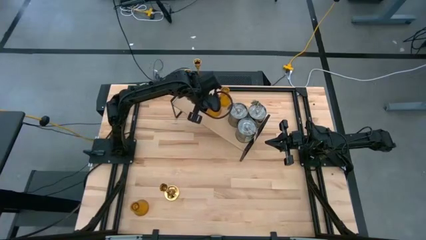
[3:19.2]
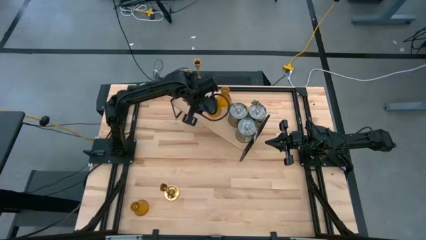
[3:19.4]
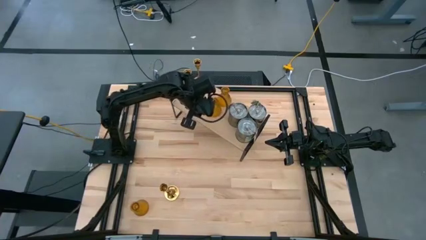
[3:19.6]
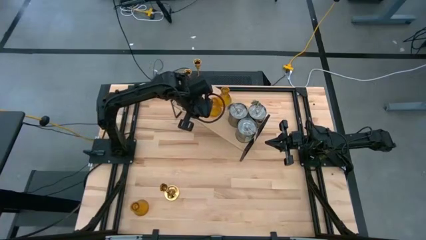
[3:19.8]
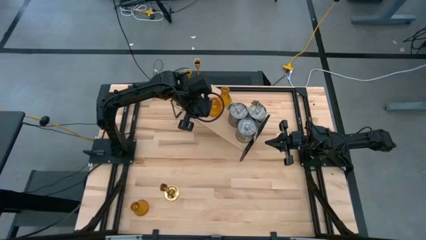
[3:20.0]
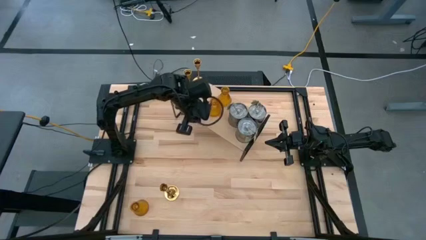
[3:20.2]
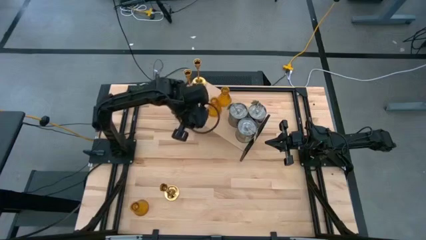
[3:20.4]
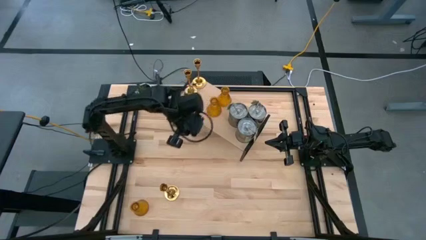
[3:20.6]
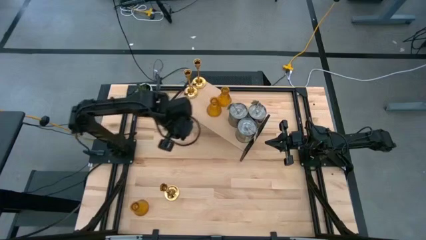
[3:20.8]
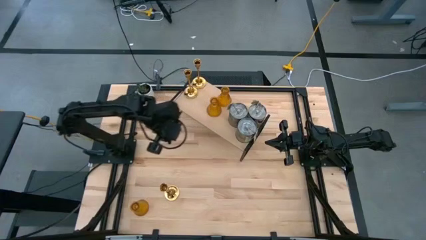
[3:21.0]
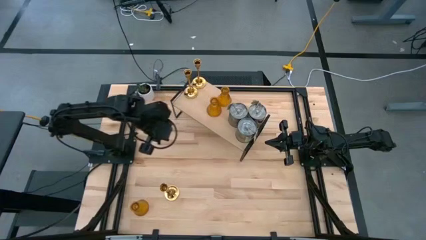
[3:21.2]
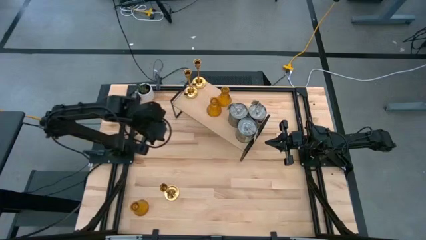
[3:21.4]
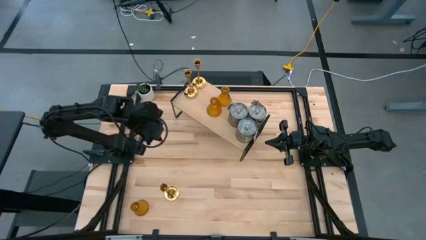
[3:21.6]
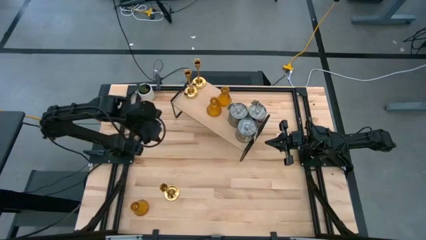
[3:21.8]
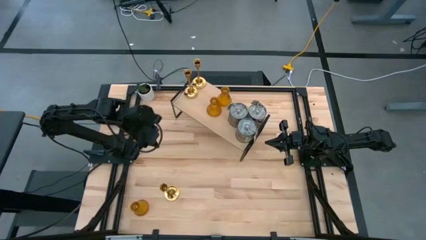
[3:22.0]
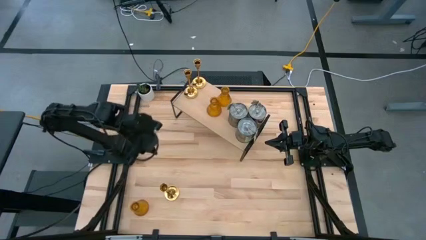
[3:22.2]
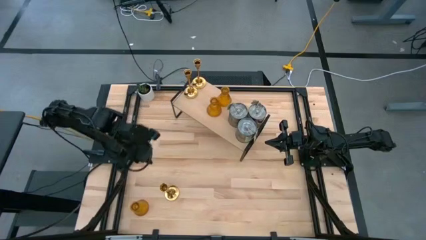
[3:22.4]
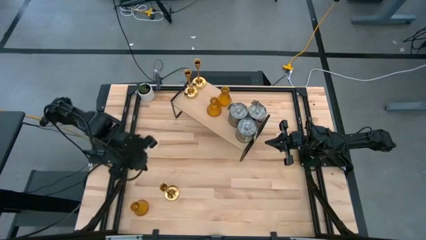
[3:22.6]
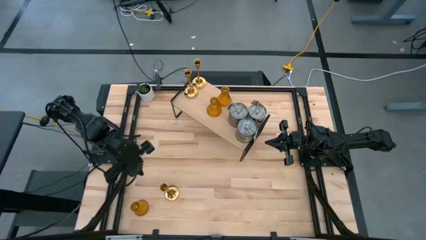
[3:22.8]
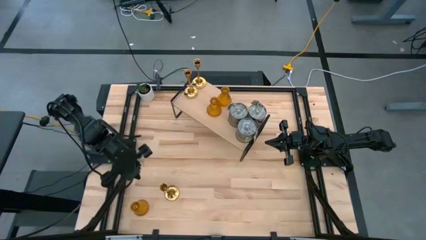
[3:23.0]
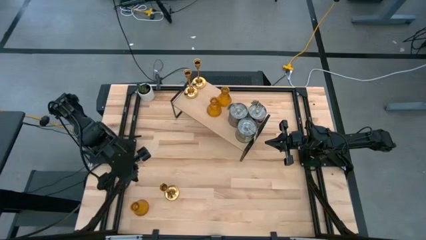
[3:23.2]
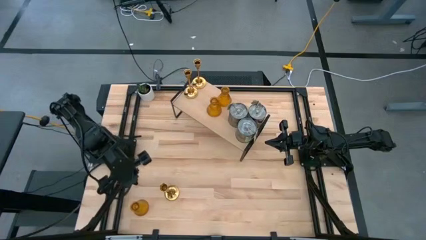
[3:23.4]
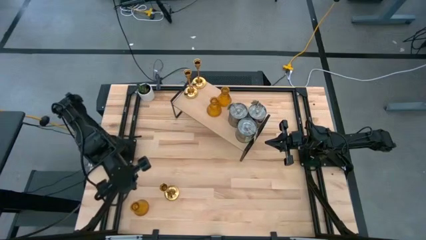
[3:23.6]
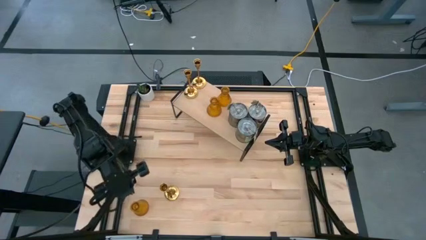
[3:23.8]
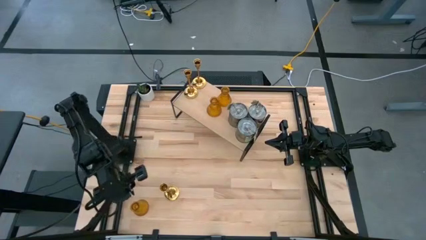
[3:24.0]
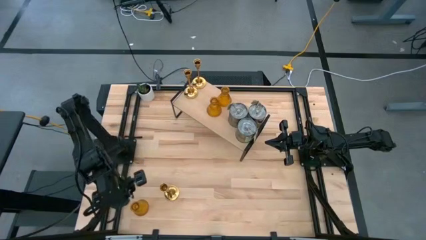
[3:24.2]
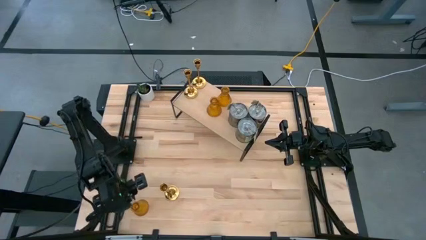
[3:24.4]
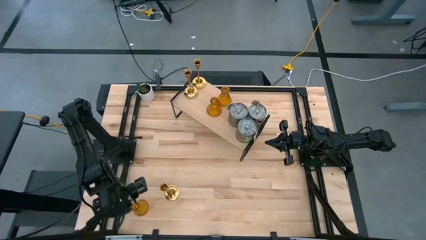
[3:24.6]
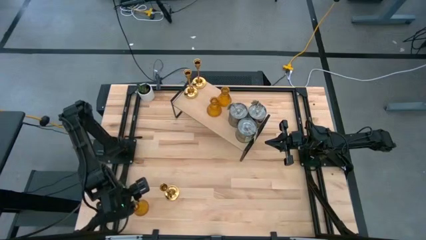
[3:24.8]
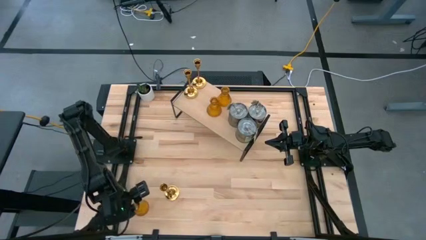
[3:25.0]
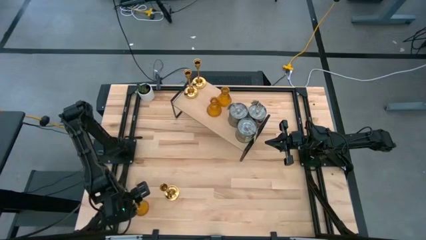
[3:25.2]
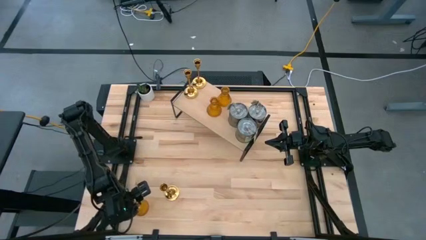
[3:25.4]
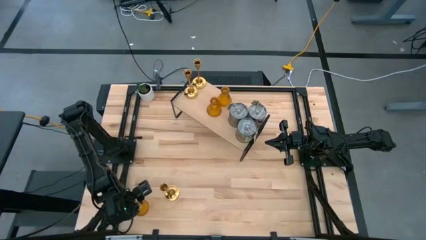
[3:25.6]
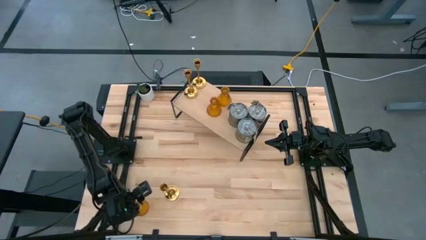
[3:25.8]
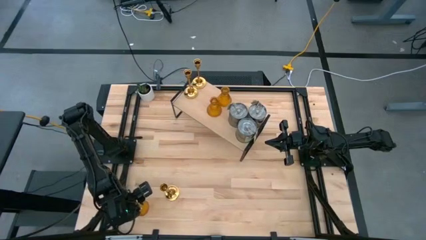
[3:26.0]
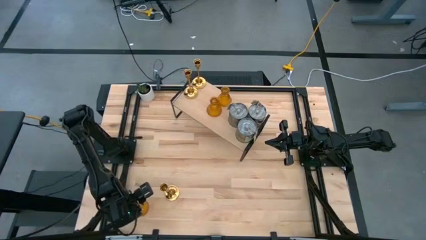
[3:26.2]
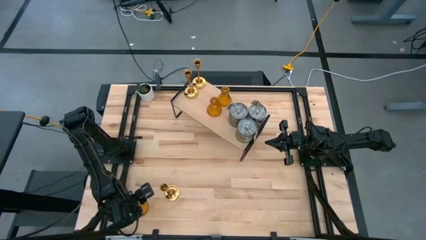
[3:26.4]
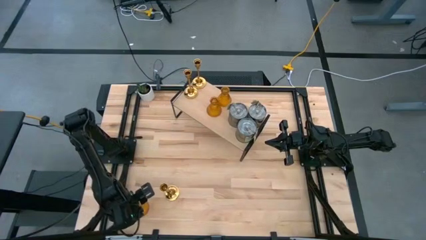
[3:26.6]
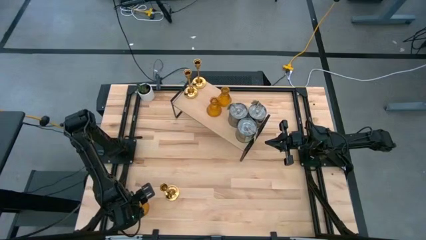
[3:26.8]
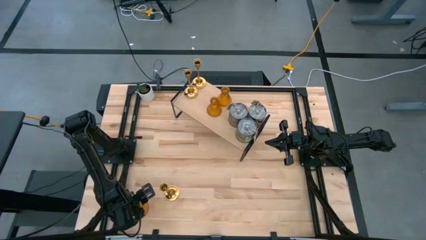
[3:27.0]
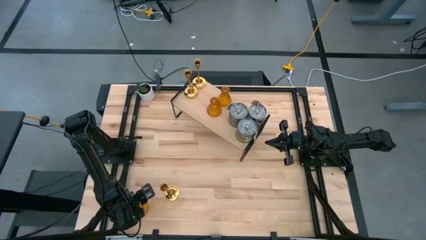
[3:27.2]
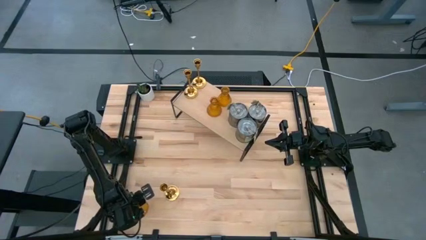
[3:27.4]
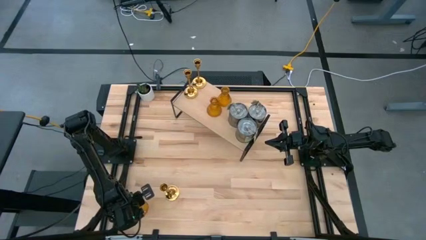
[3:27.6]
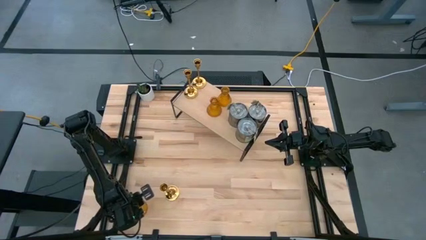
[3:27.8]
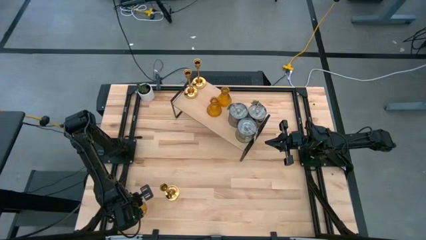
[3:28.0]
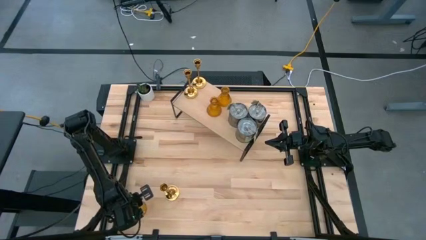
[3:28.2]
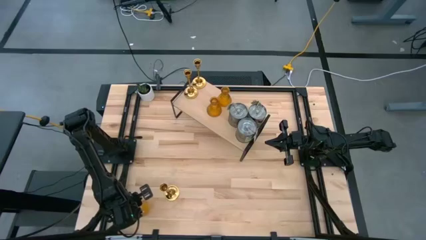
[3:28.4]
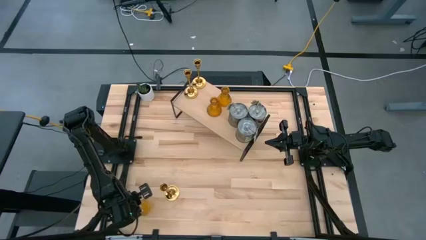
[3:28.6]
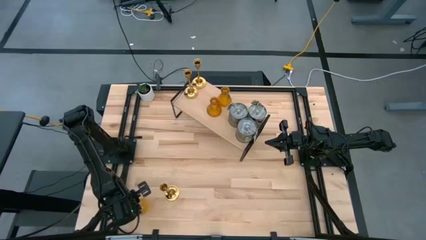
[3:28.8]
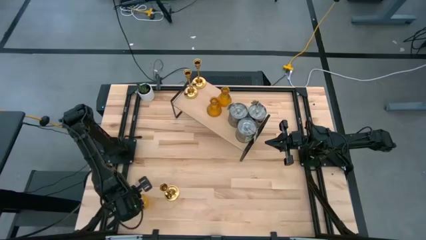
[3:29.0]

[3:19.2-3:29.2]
Task: Pick & Place candle stick holders
Put the yellow candle holder on the shelf aligned with the other yellow candle holders

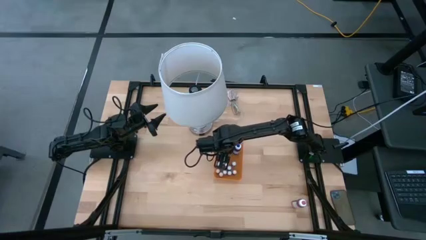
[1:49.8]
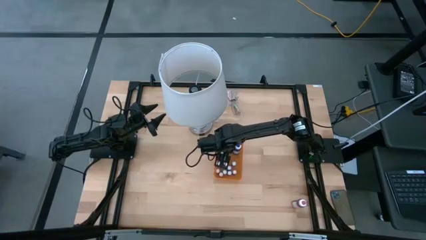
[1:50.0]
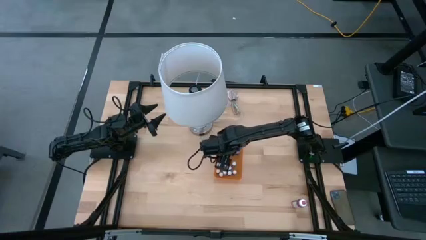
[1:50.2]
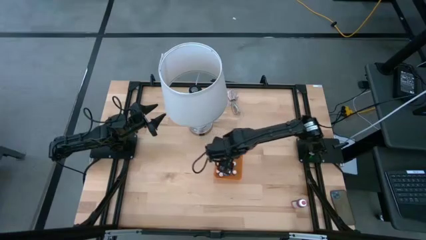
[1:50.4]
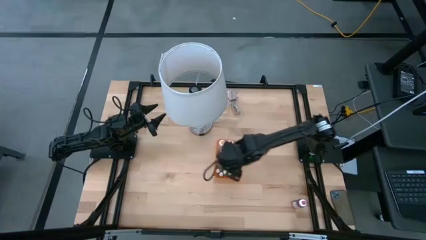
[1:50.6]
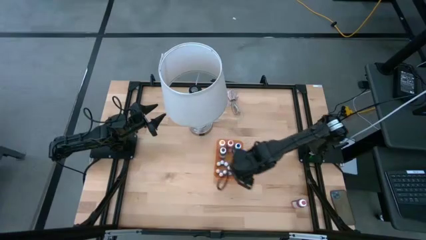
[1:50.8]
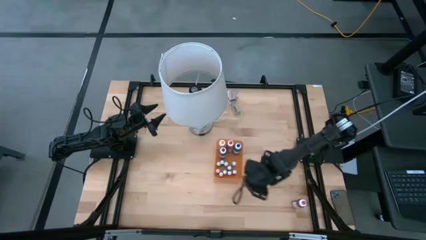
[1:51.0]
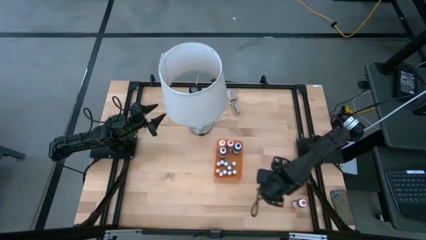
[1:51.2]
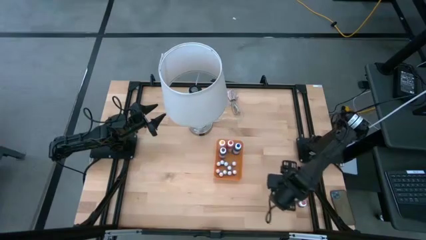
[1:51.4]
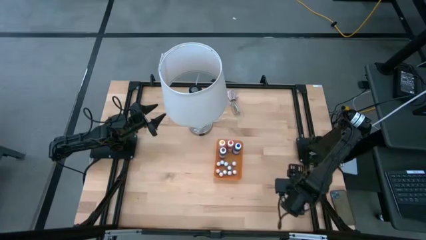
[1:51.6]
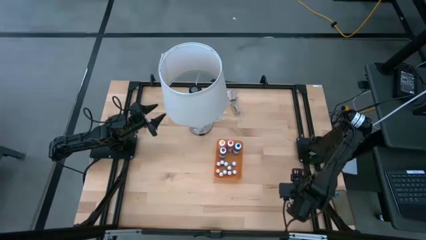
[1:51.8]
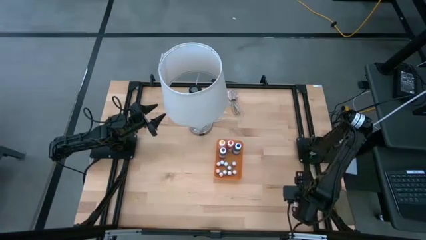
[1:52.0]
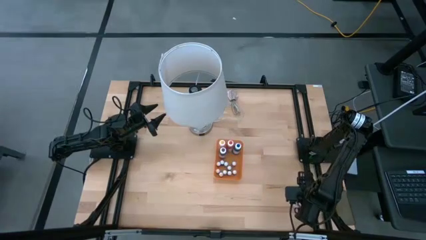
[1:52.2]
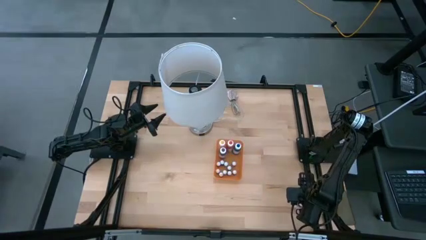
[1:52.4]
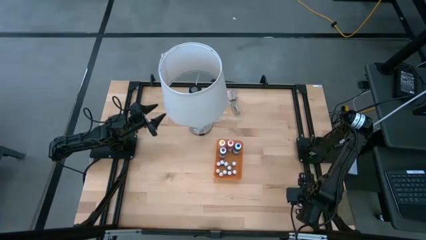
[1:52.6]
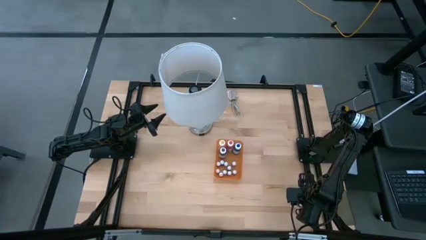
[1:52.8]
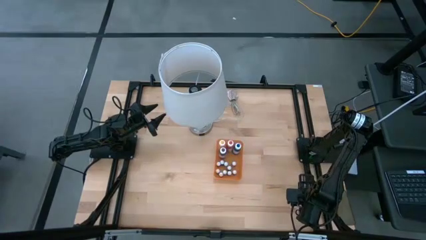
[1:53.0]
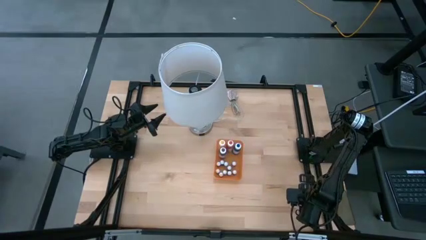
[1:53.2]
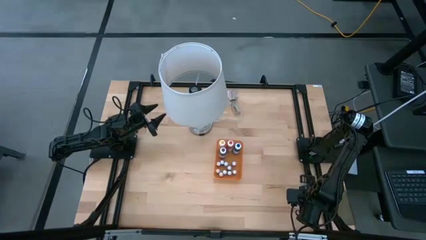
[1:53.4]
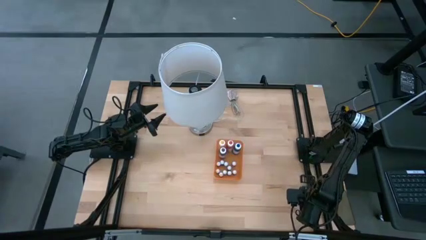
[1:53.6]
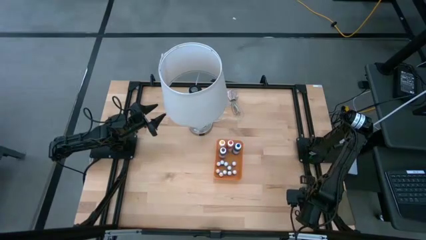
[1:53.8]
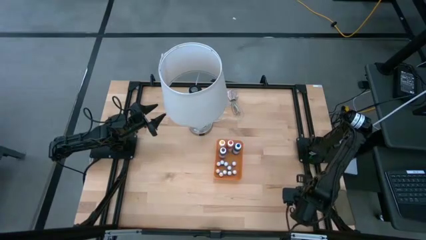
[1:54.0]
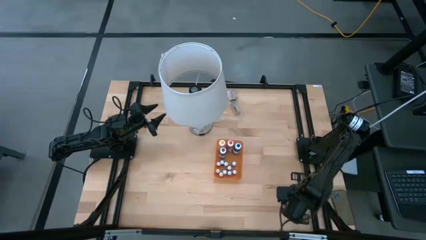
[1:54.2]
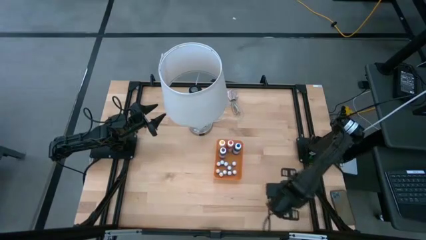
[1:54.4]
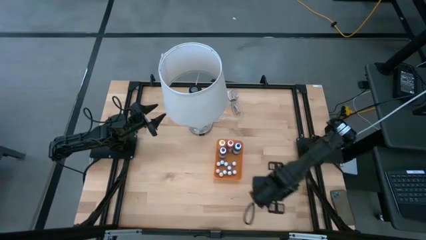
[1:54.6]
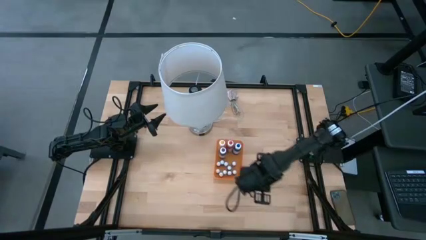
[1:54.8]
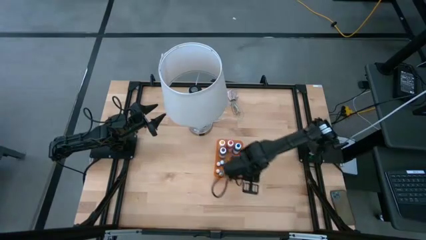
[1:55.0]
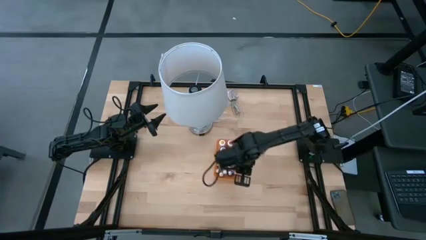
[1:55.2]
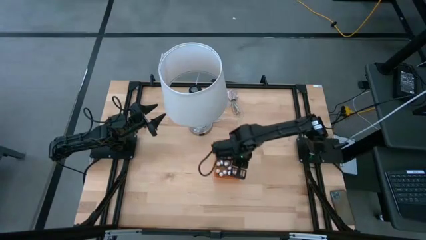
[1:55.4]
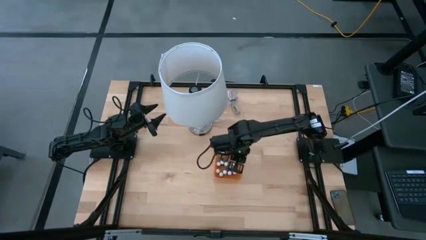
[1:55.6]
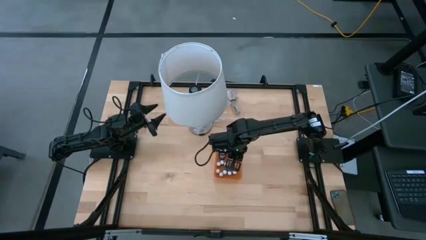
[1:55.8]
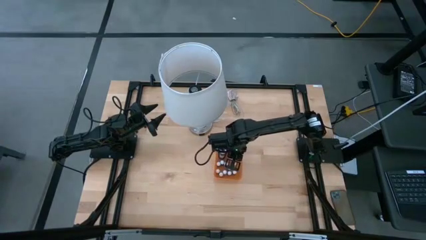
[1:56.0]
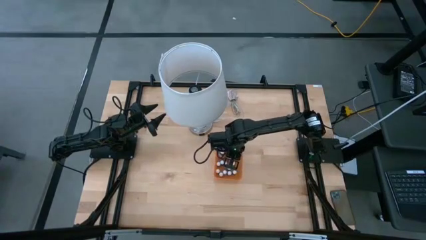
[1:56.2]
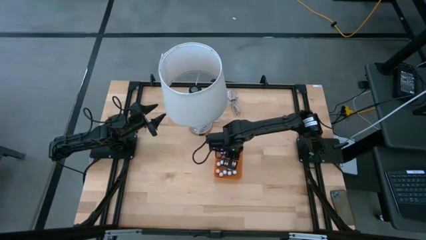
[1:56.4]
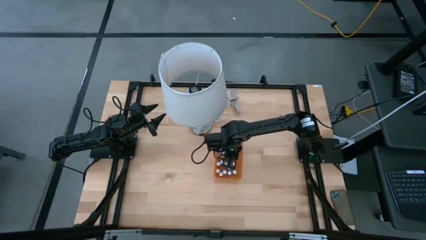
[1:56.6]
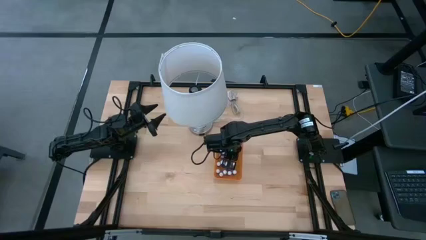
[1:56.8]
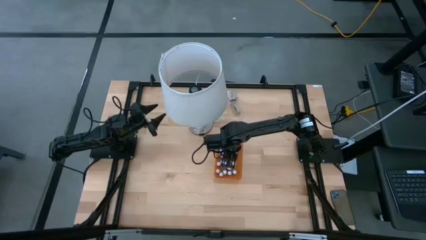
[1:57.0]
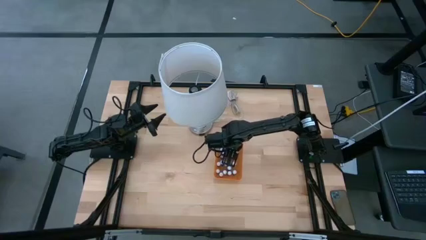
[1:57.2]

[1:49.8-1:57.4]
Task: Pick & Place food coloring
Put the big pink food coloring bottle into the bin
